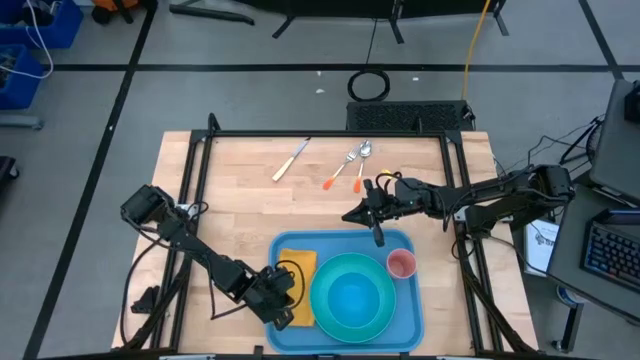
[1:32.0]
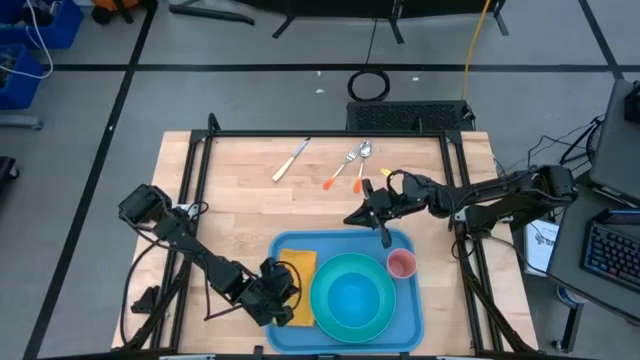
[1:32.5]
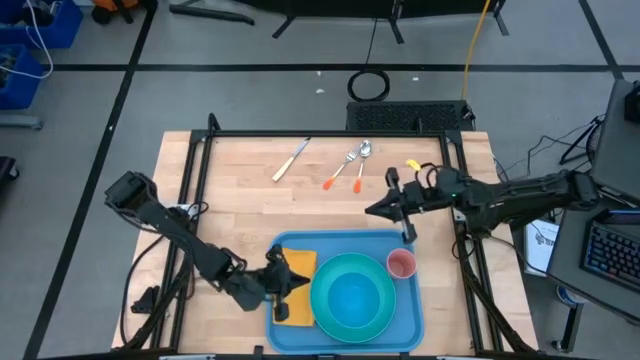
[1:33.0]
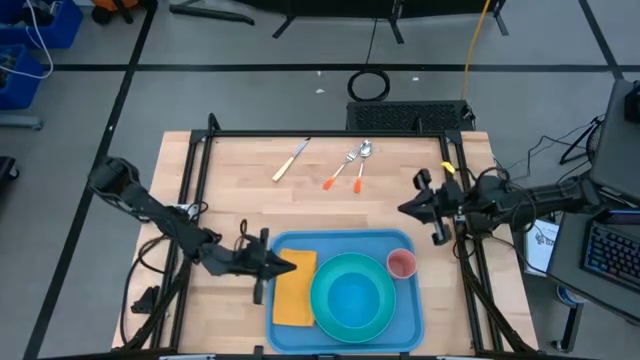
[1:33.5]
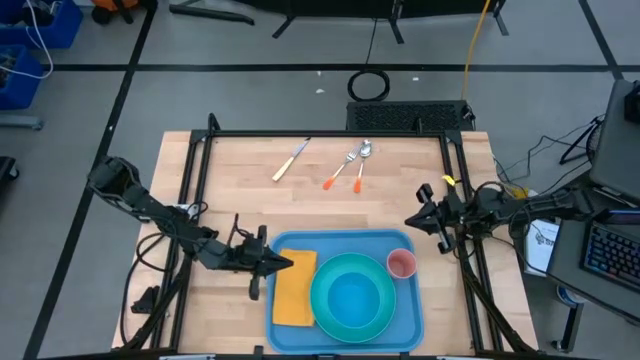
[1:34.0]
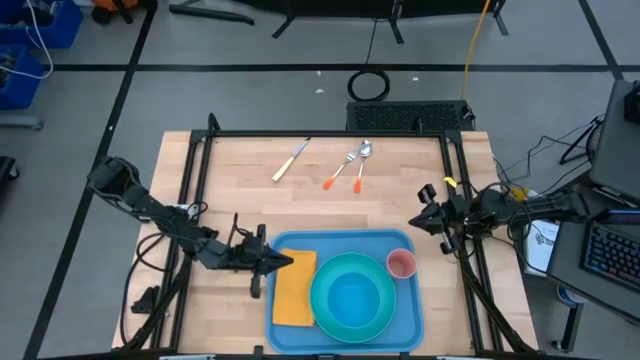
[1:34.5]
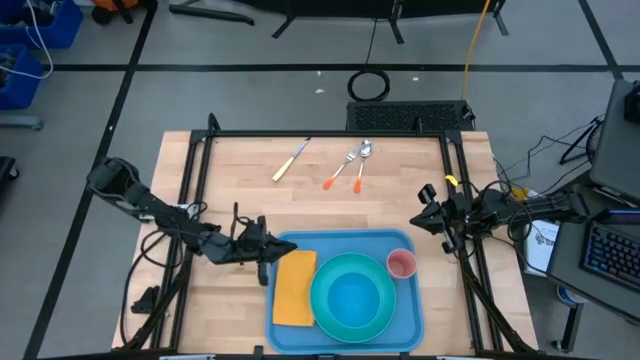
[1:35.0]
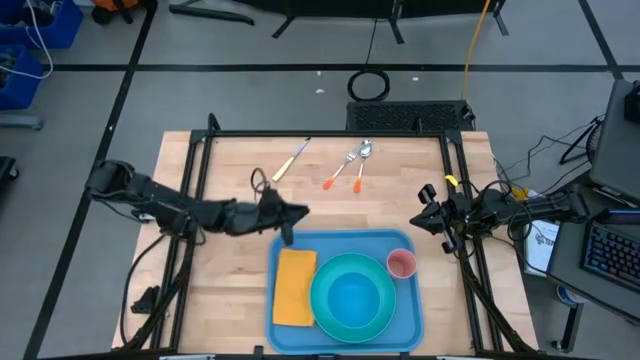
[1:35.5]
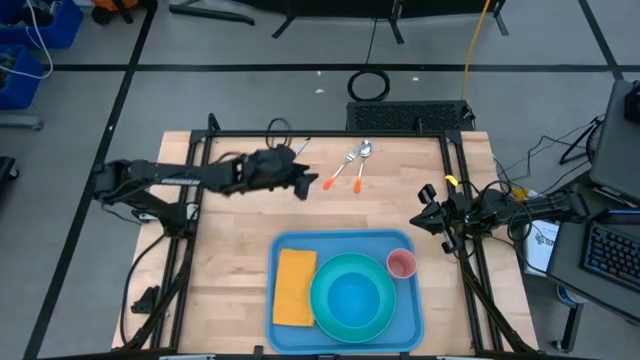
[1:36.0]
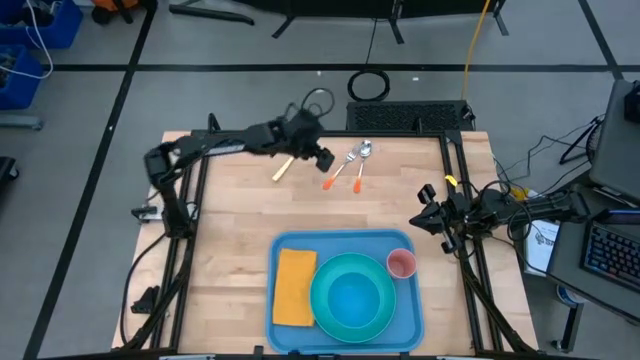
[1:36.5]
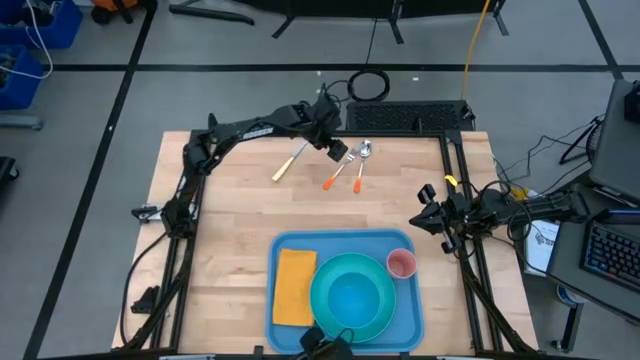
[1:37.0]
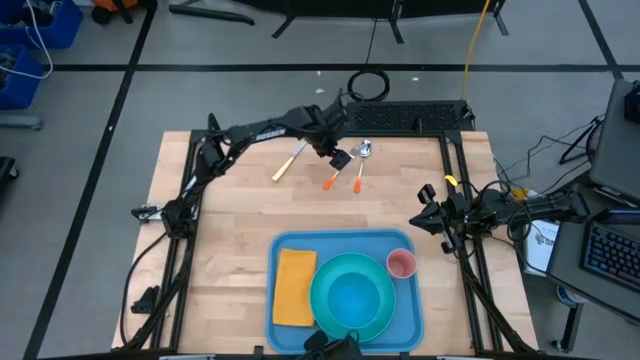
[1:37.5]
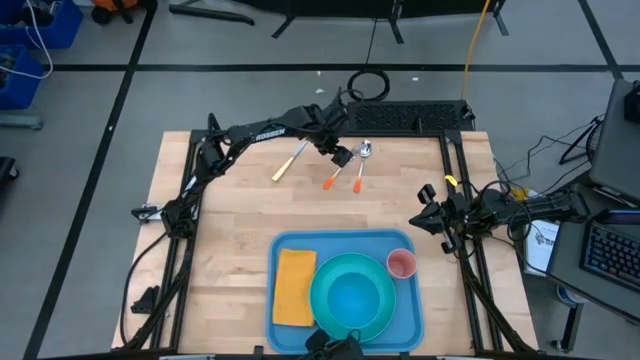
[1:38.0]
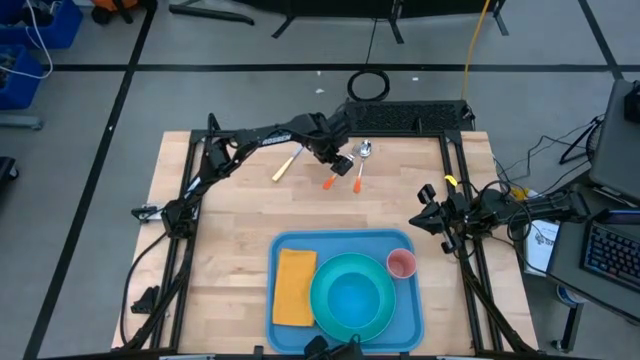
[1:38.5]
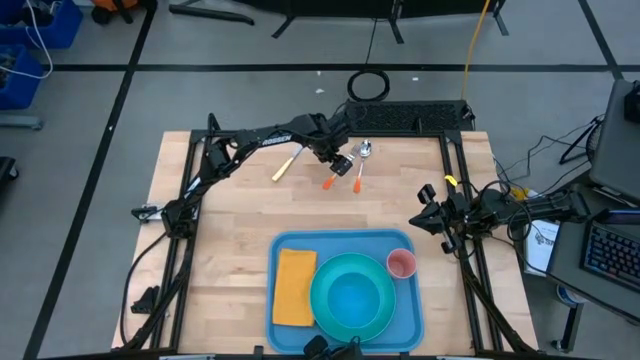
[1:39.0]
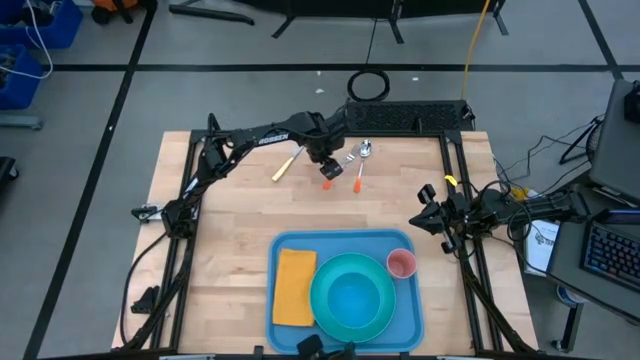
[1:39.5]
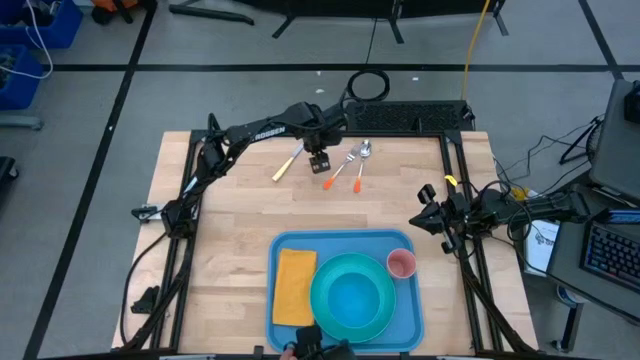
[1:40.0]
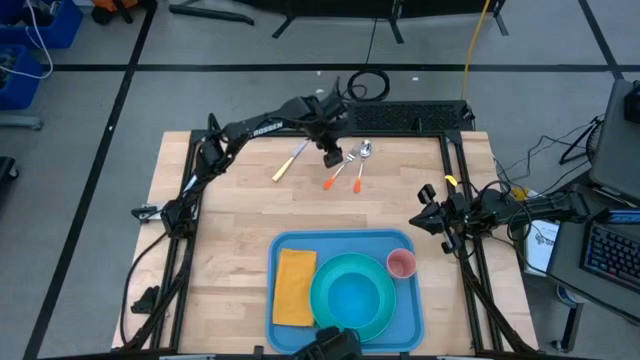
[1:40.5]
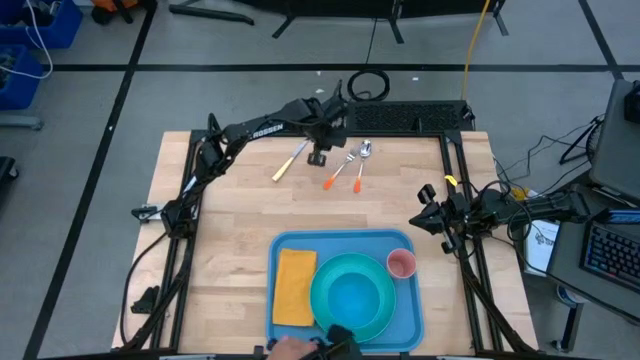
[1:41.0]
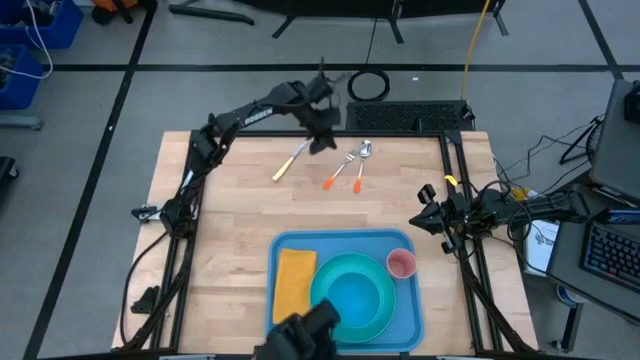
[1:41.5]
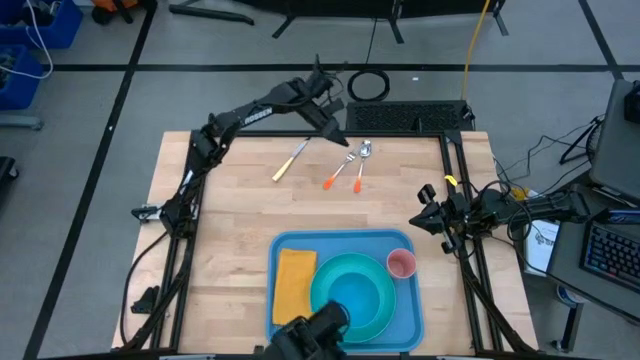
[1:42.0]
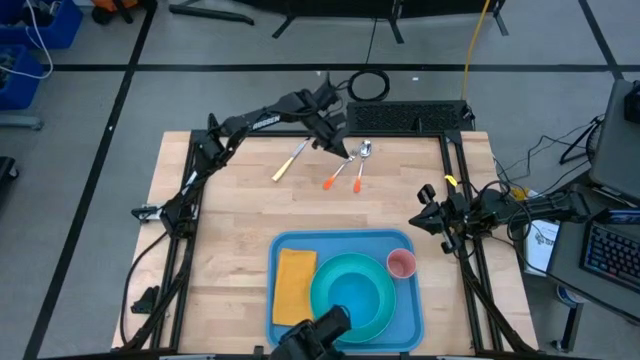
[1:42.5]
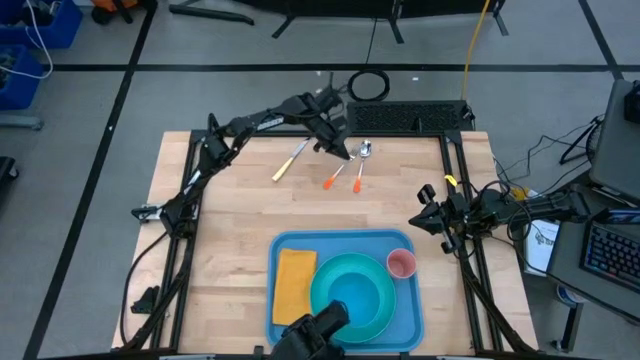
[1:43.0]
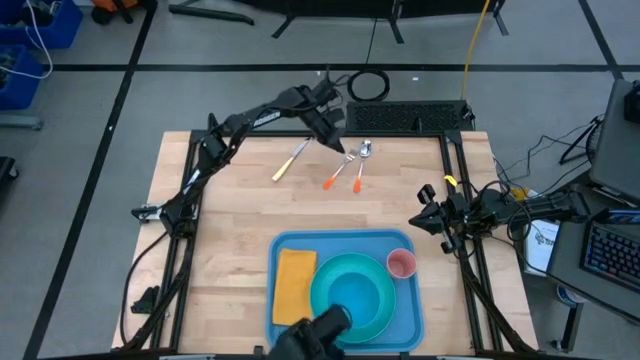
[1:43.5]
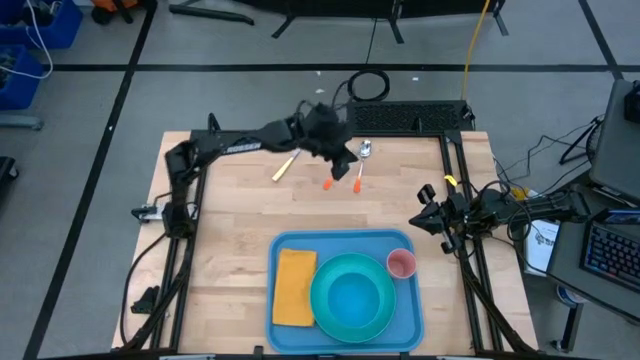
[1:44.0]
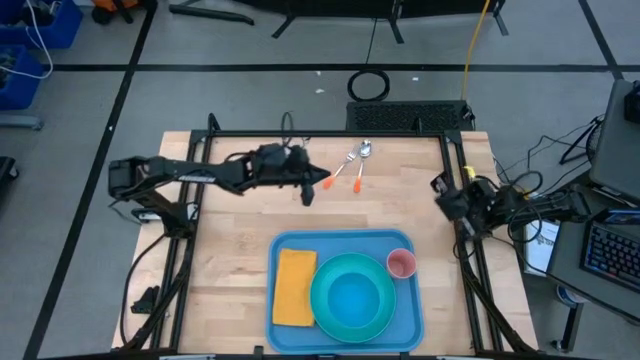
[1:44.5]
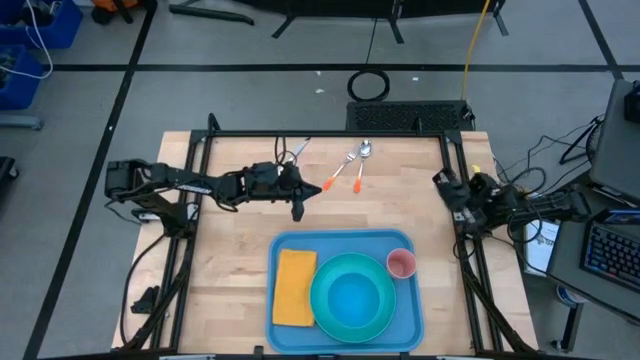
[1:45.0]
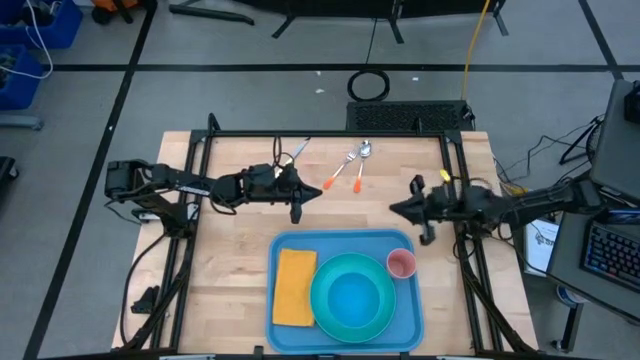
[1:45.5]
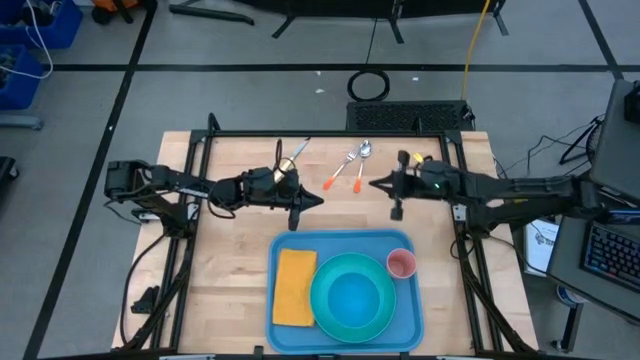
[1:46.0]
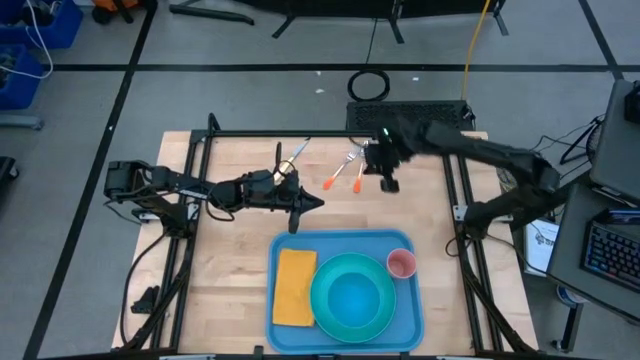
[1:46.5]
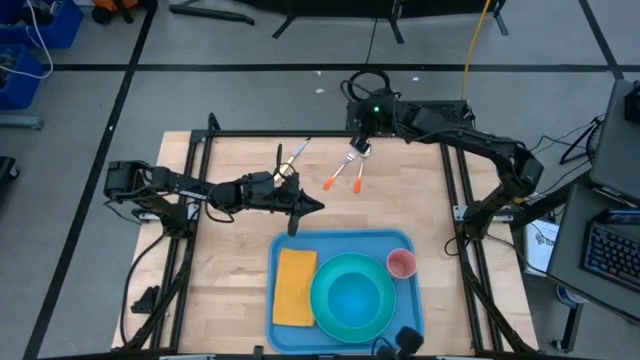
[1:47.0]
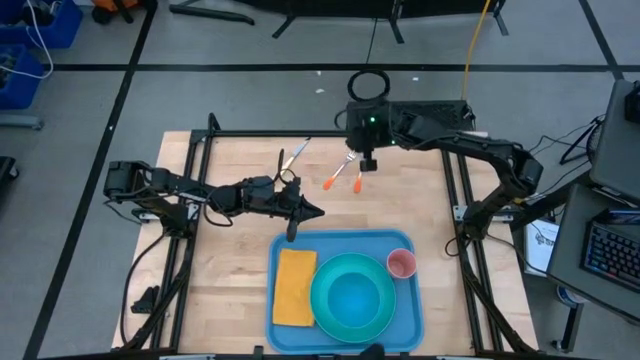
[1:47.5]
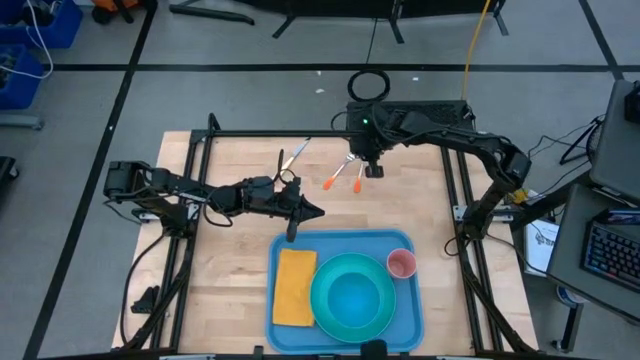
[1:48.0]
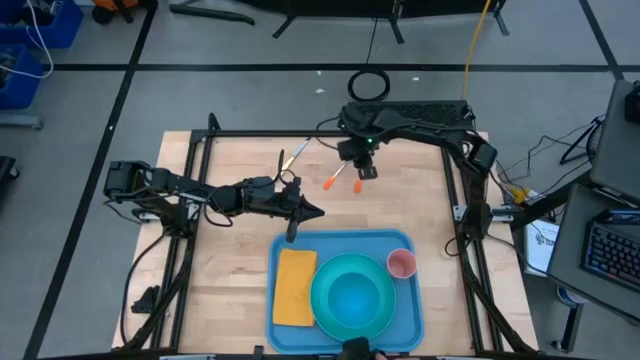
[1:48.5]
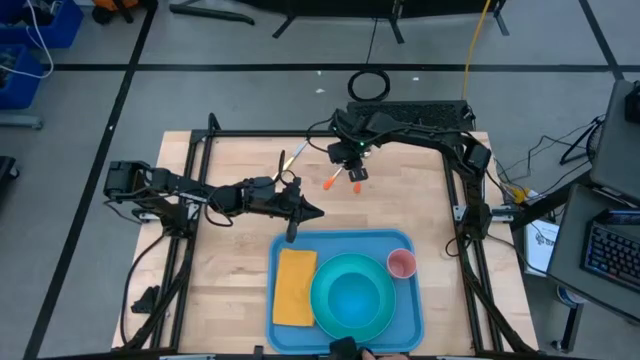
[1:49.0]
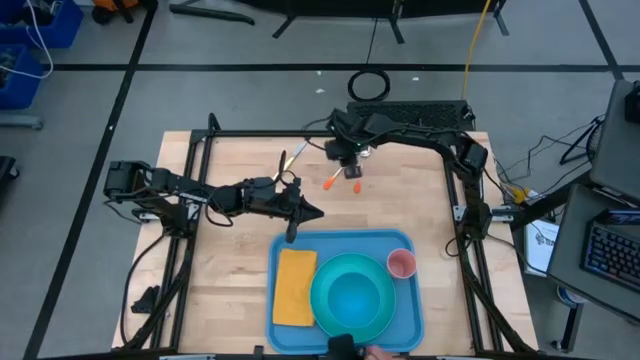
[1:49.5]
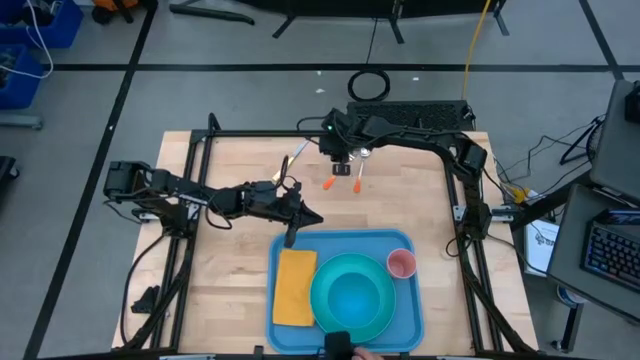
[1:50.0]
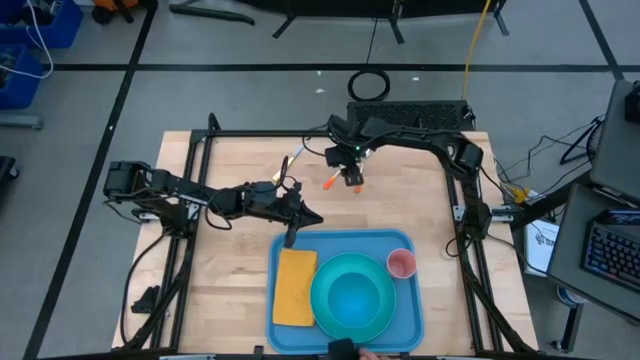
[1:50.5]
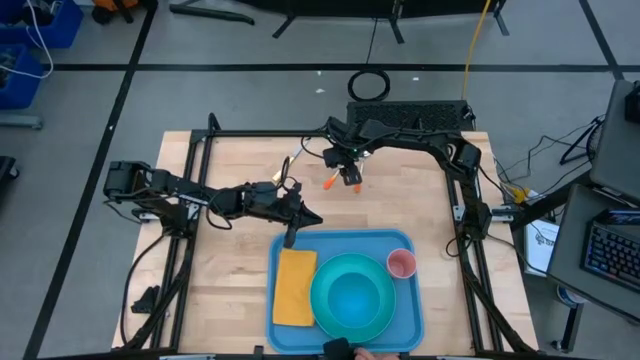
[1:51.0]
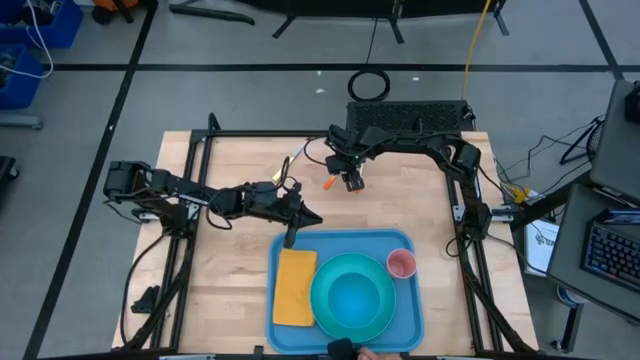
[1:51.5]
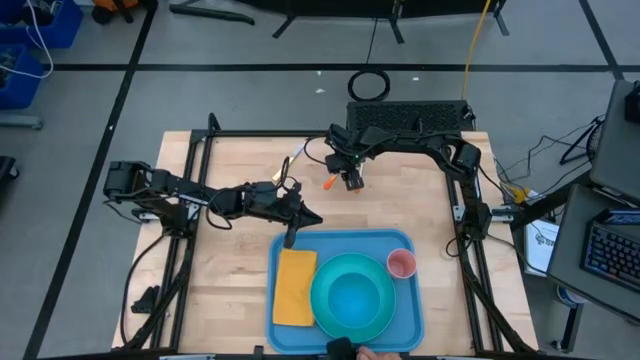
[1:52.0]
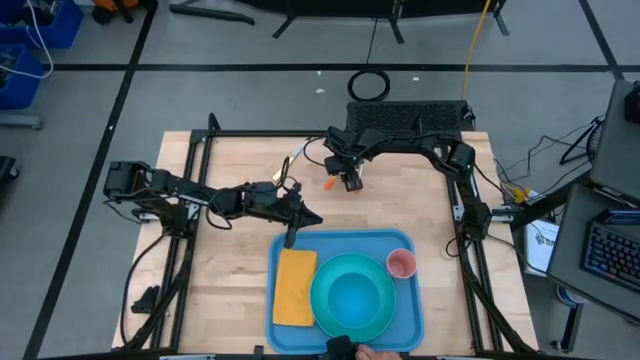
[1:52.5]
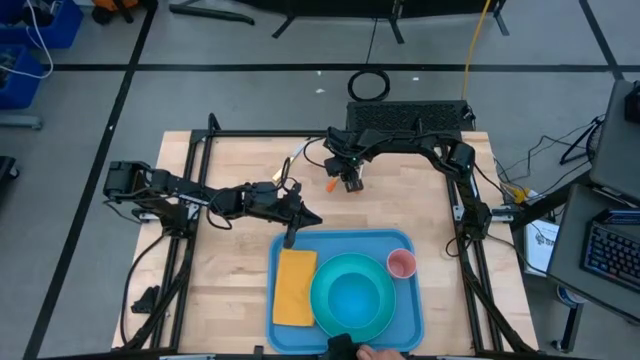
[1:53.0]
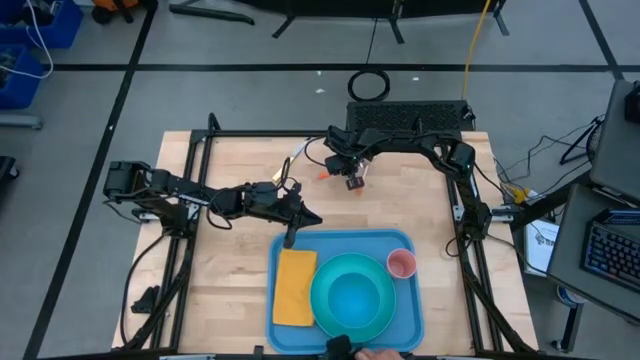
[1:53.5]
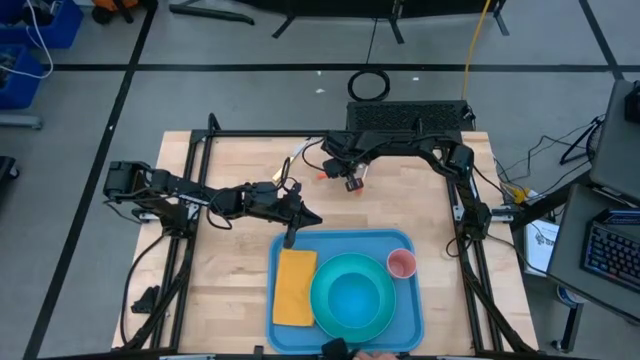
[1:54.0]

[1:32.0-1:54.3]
Task: Set up tray
Put the orange fork on top of the yellow table napkin
